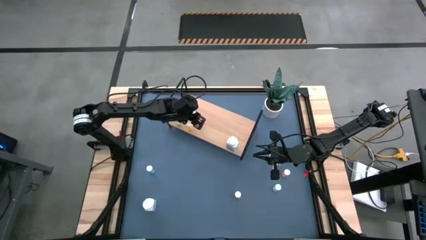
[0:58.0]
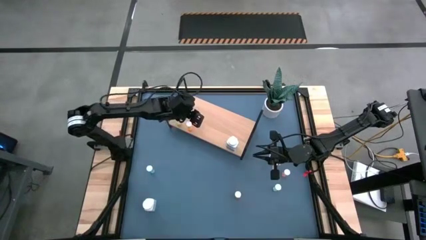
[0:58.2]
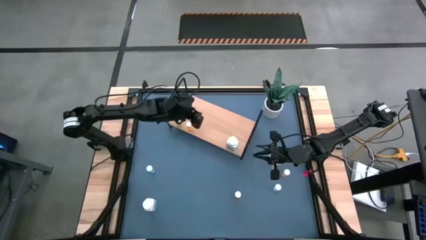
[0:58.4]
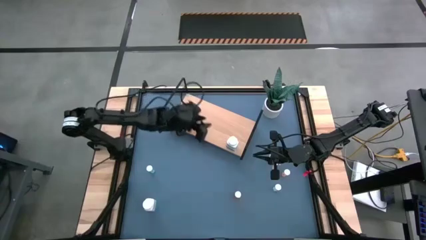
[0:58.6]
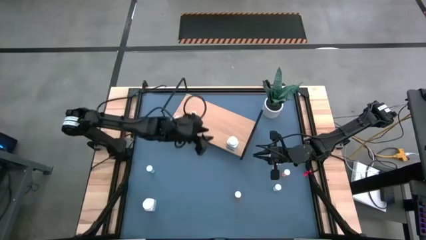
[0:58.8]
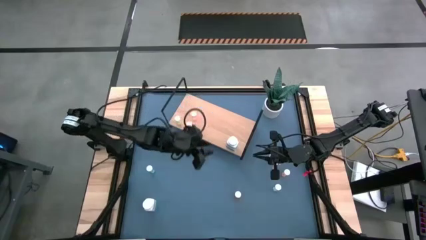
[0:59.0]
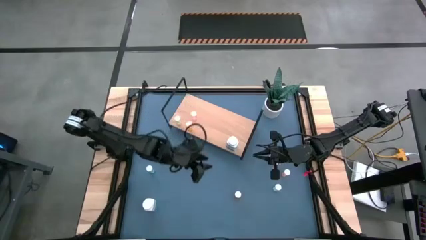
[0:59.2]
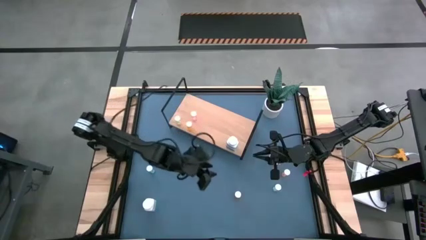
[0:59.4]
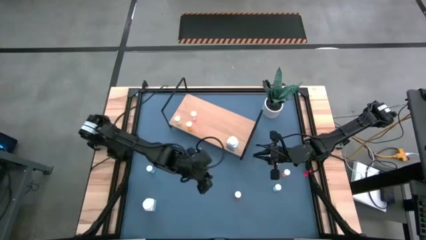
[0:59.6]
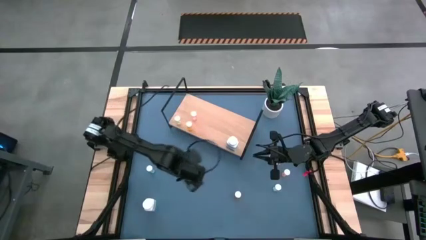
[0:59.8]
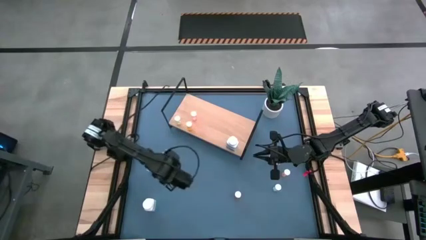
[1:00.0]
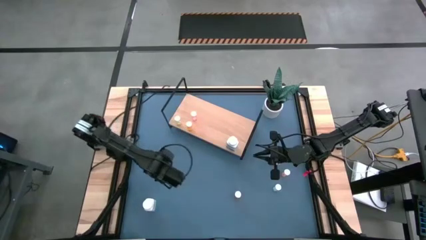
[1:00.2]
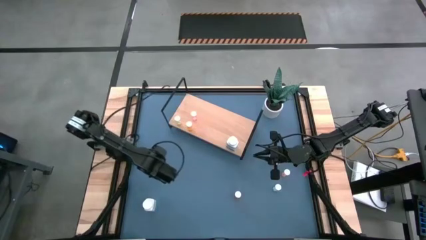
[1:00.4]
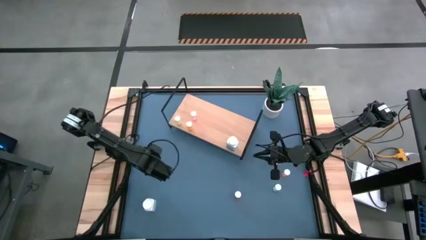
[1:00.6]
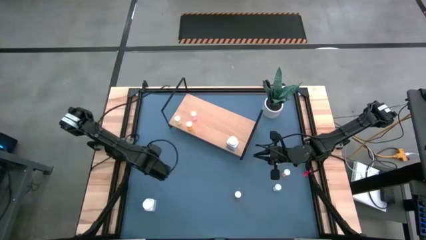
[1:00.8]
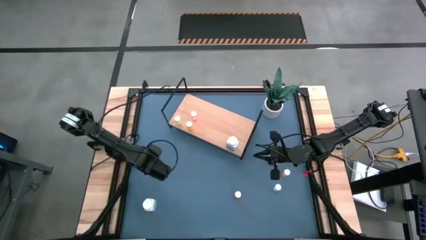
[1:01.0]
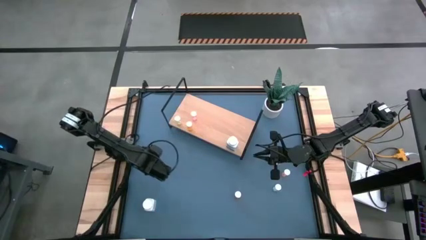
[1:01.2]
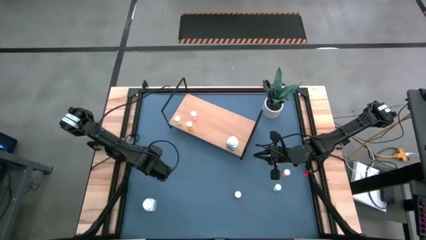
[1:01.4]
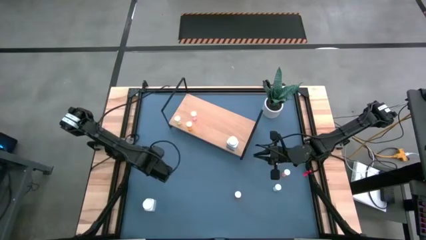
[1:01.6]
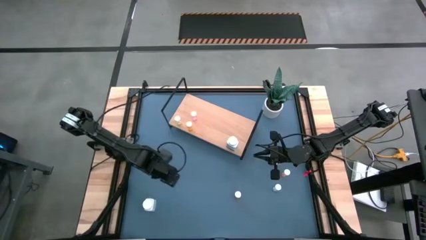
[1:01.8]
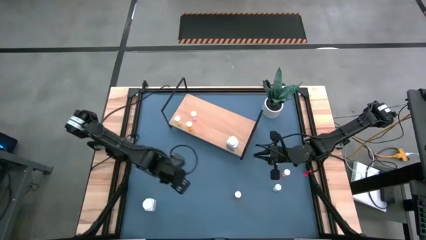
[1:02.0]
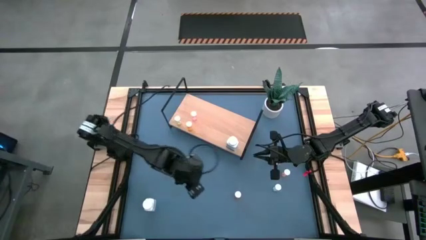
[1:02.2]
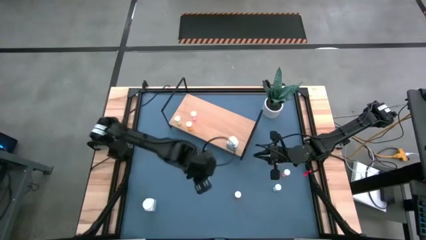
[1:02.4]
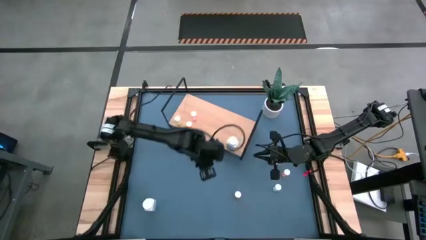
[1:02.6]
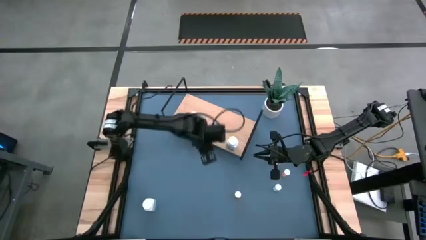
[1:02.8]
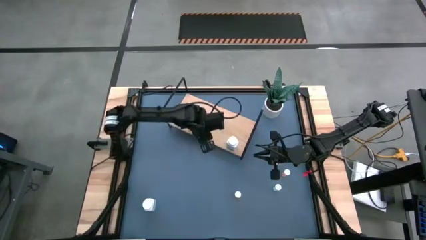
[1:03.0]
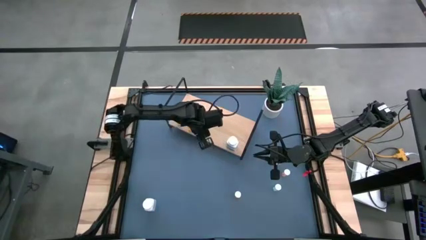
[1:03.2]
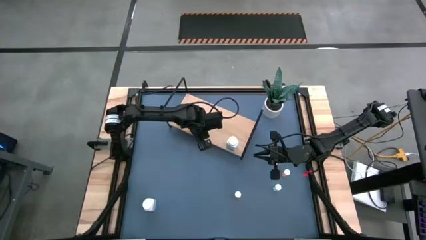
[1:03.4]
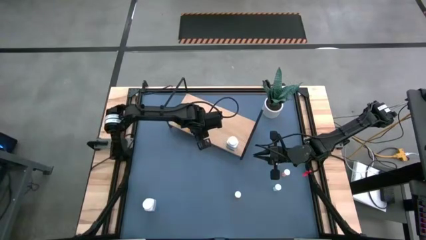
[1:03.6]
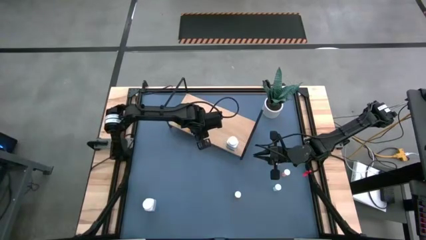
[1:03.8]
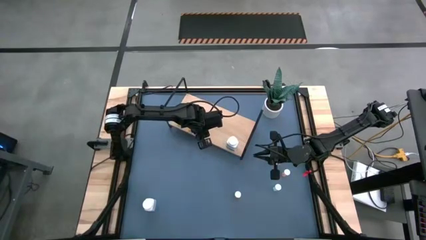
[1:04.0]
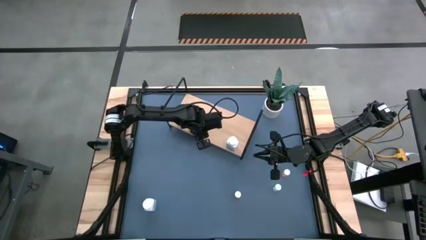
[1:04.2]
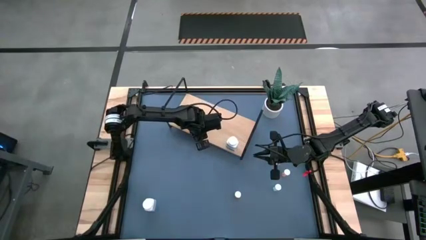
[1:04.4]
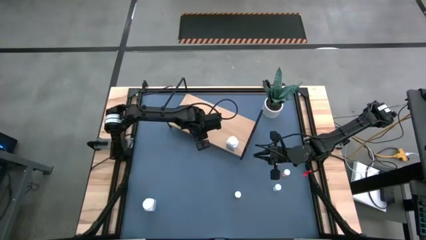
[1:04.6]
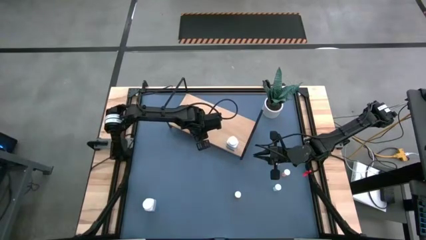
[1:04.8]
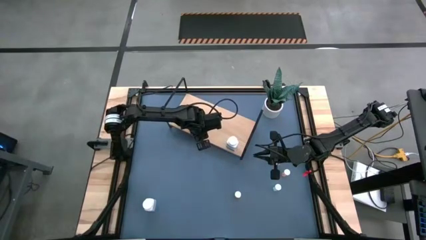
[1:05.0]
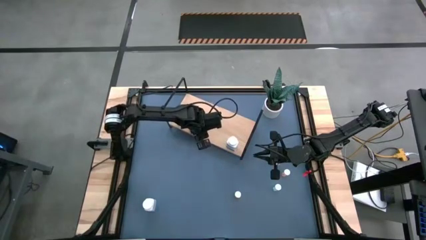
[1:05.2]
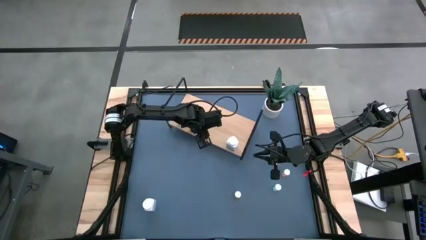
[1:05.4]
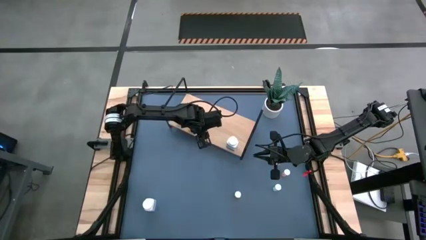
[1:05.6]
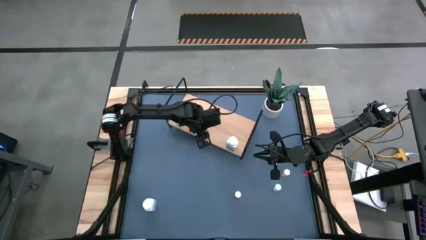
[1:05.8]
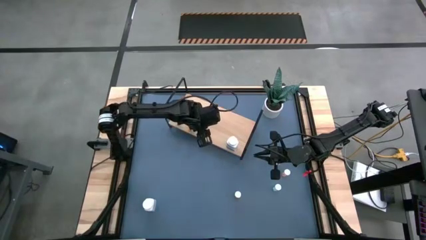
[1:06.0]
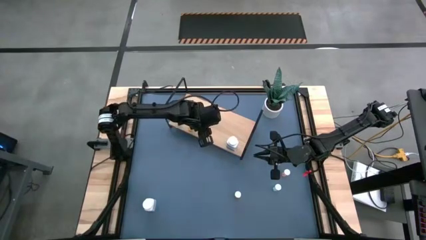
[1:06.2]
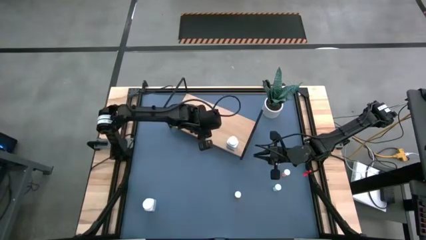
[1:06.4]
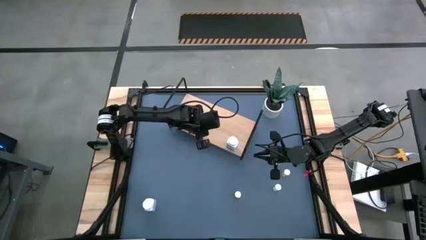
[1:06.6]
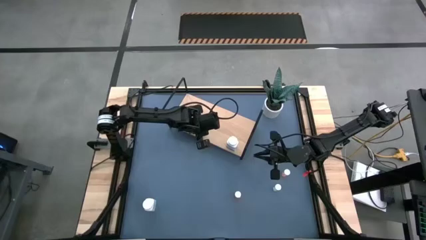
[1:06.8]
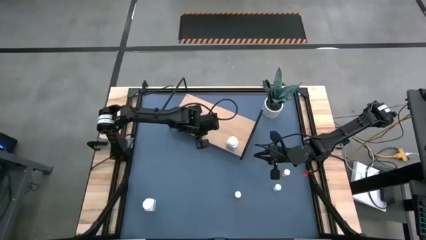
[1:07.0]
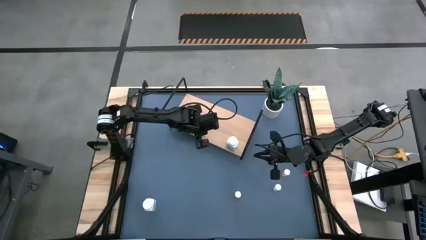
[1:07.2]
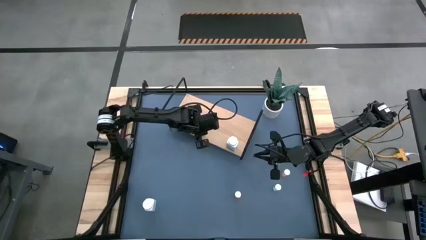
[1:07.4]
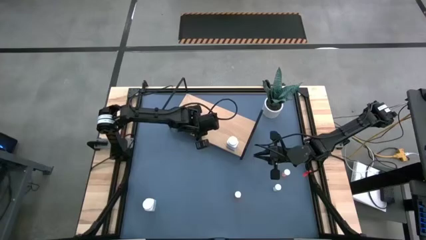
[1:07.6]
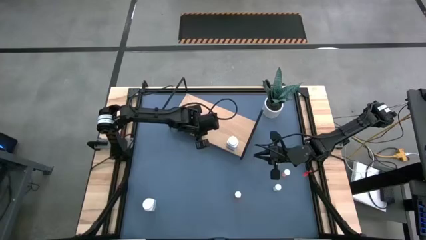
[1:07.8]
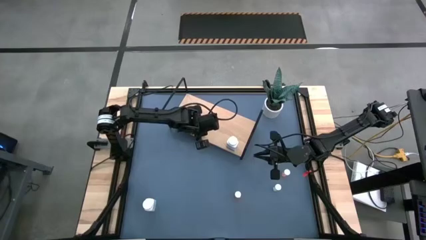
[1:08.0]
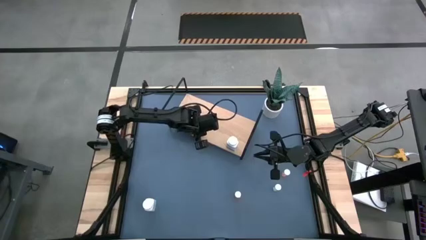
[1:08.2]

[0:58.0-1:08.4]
Task: Pick and place medicine bottles onto shelf by color
Put the left blue pill bottle on the shelf

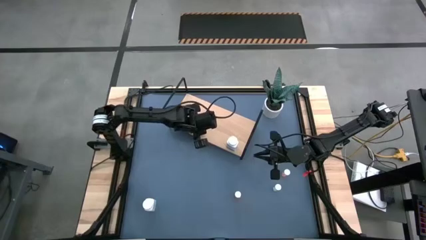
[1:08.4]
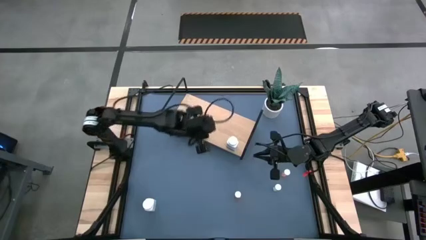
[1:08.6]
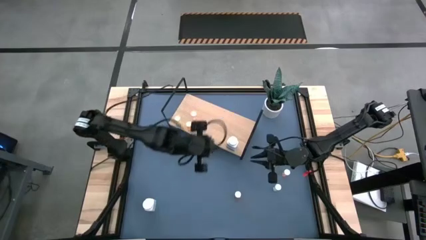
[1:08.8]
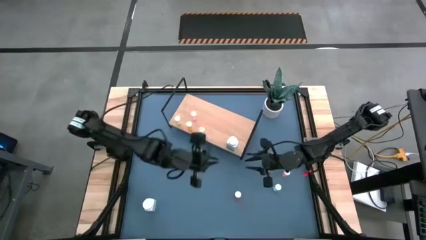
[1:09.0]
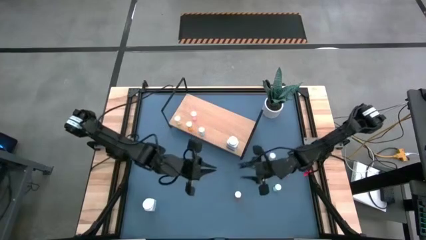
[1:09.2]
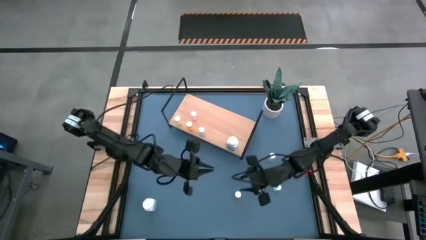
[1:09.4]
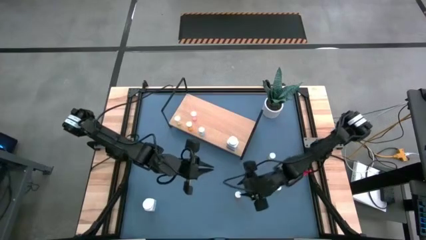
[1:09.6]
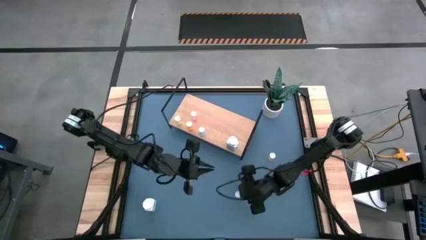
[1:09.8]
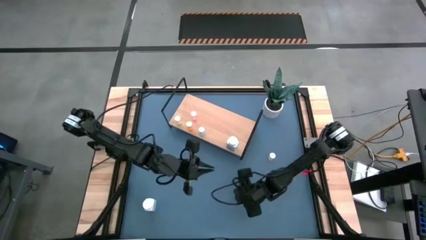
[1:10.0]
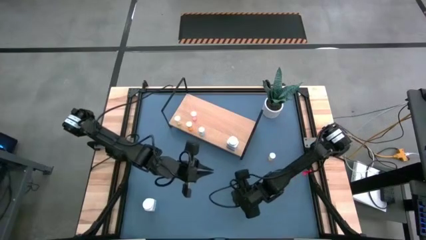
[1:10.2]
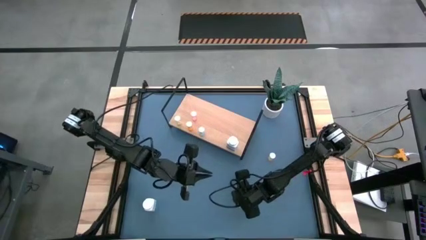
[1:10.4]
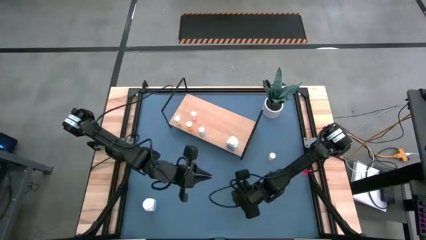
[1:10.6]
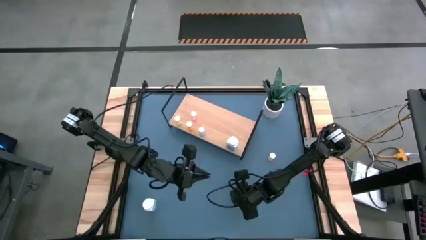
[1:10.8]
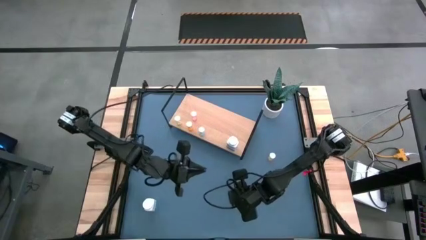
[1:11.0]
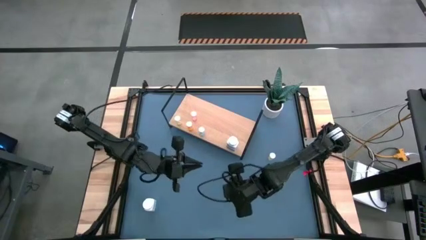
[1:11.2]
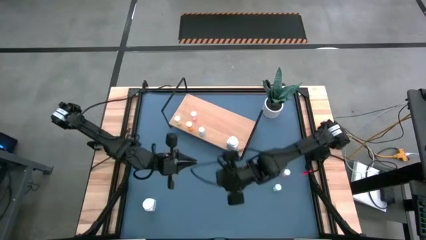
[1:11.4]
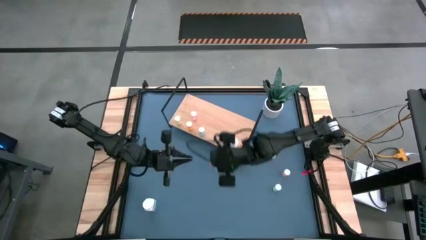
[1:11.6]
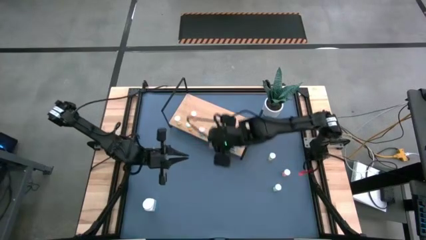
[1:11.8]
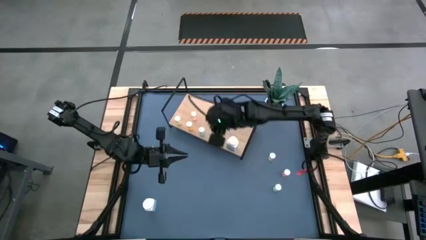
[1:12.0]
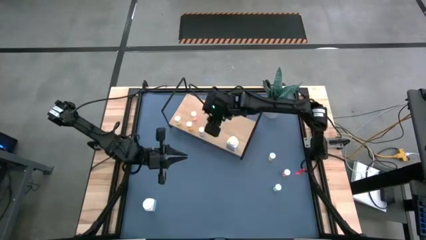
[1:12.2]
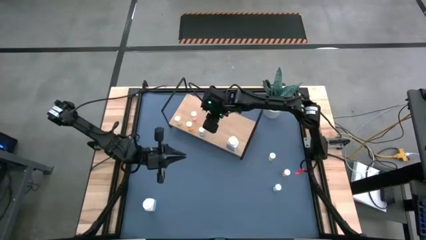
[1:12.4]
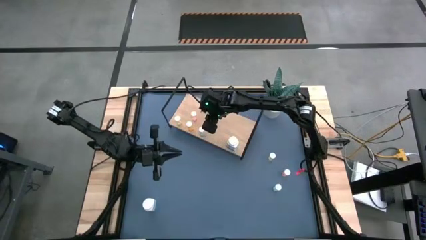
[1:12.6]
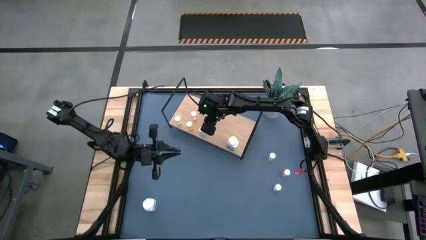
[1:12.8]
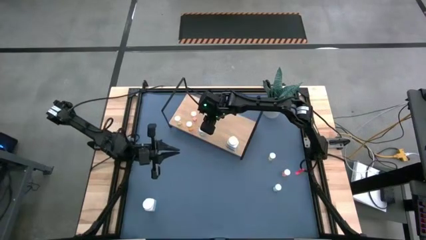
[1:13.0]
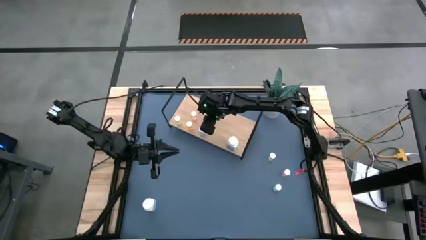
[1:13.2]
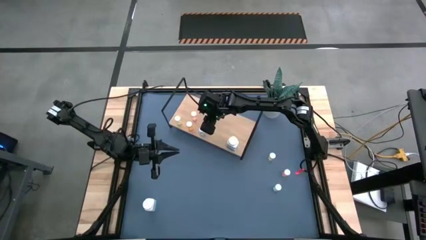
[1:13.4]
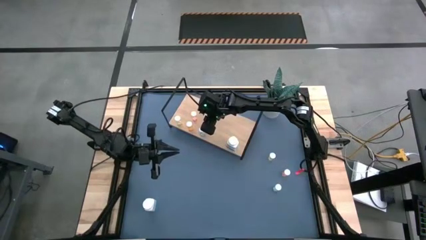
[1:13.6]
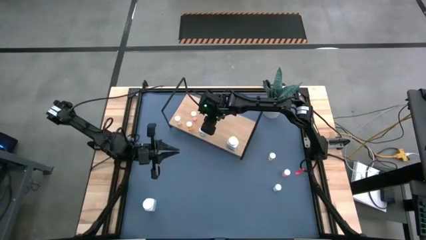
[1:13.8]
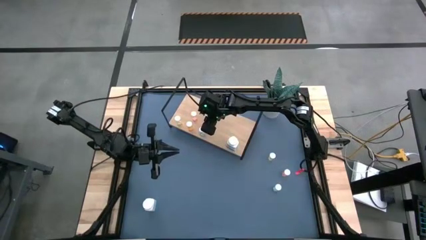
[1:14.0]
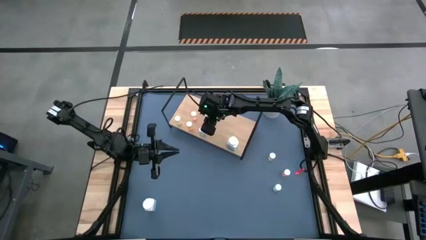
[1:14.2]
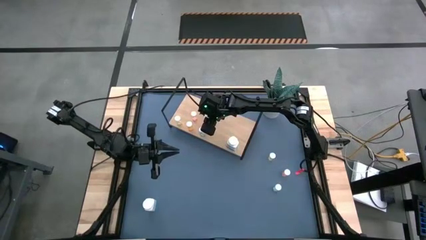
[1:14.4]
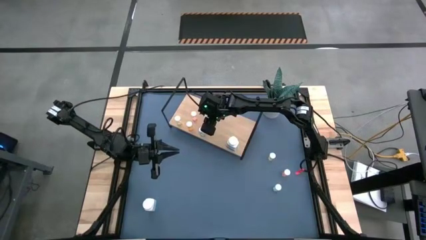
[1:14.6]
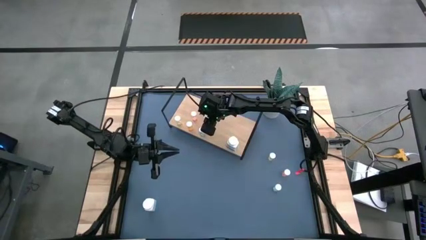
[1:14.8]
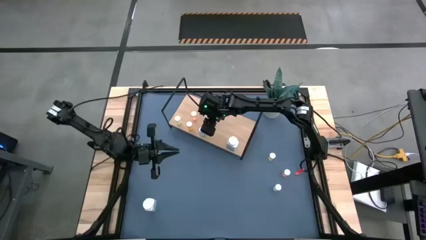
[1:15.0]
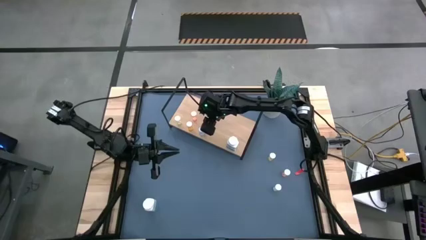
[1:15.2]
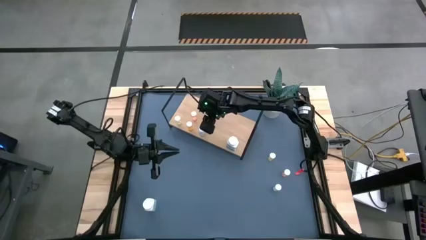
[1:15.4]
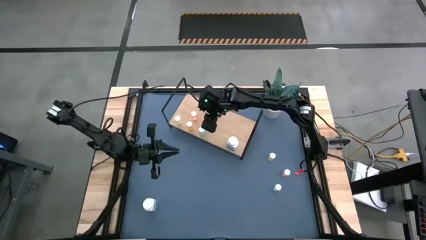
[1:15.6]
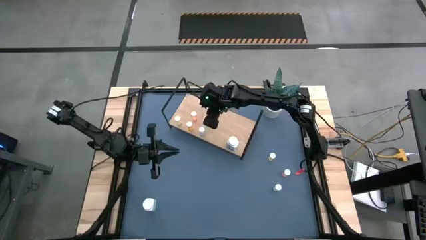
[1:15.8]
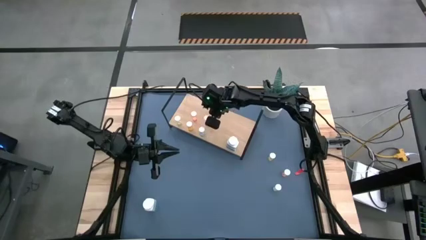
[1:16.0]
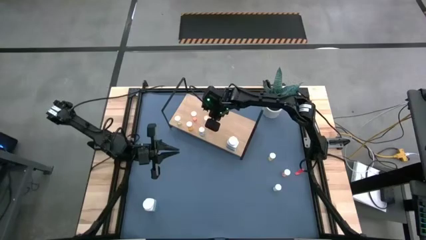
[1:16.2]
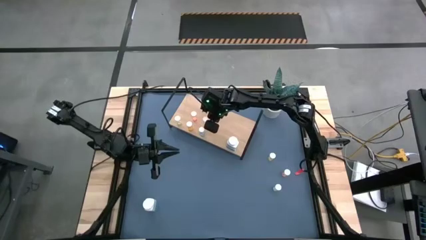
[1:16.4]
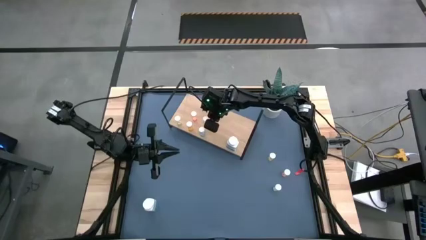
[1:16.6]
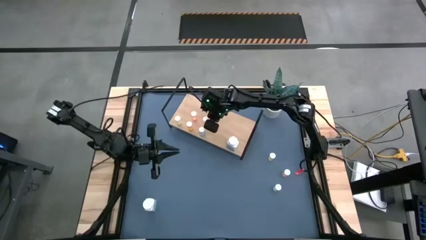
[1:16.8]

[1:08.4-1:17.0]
Put the orange pill bottle on the shelf
